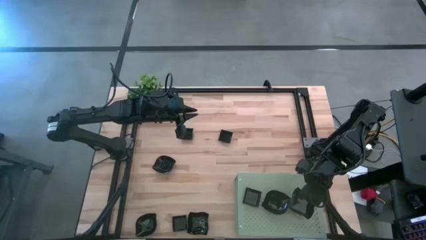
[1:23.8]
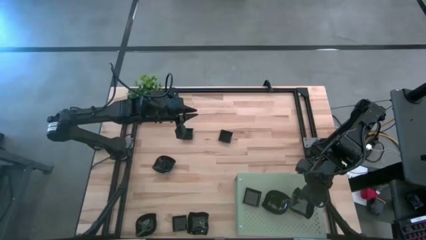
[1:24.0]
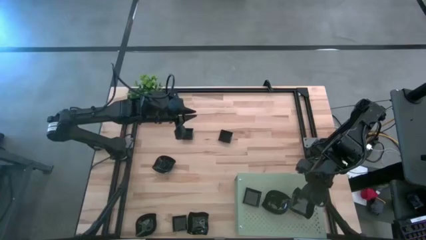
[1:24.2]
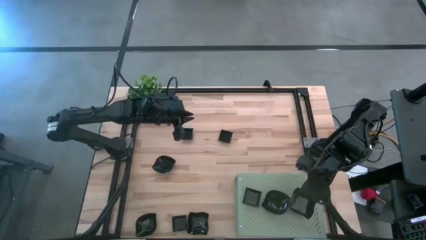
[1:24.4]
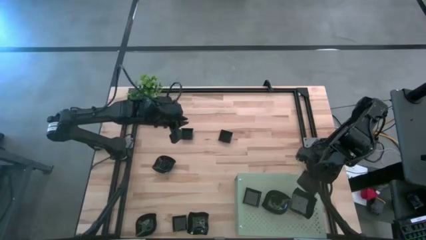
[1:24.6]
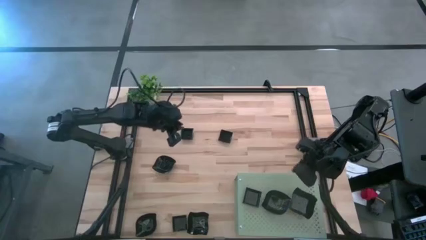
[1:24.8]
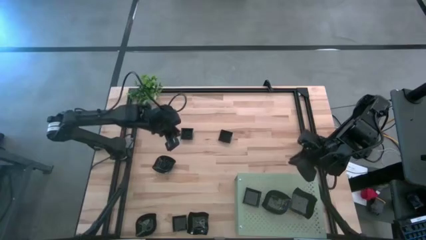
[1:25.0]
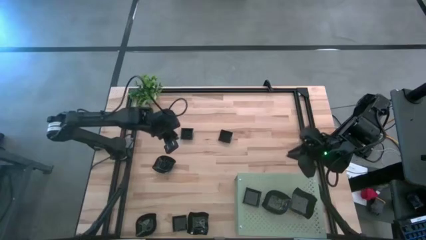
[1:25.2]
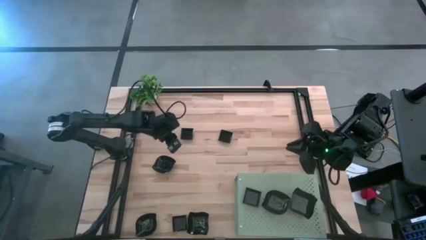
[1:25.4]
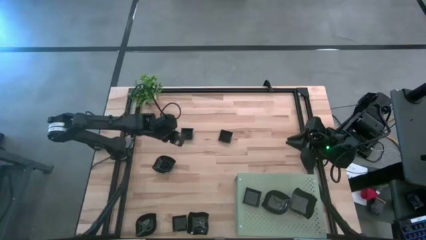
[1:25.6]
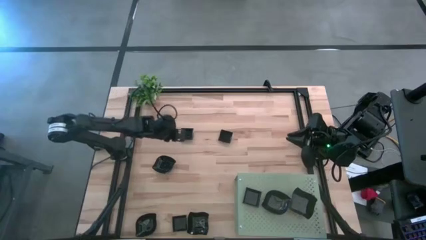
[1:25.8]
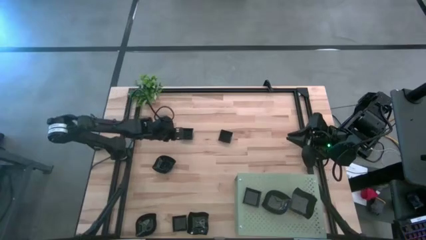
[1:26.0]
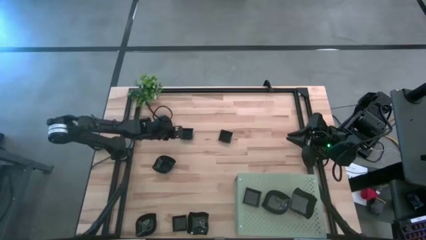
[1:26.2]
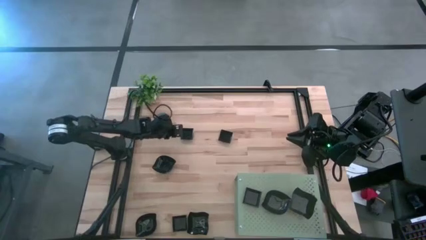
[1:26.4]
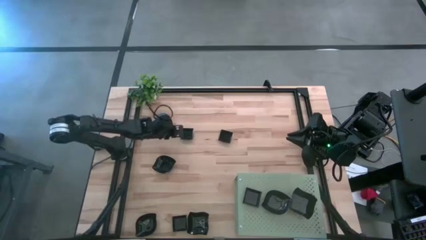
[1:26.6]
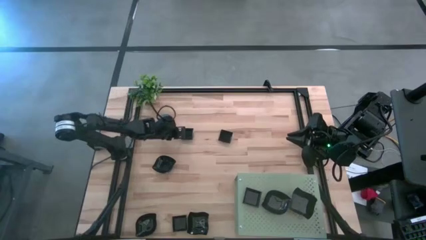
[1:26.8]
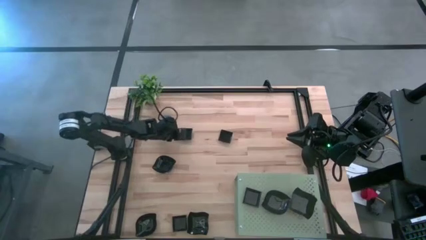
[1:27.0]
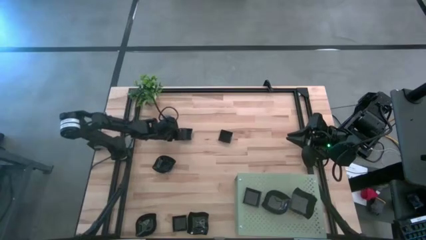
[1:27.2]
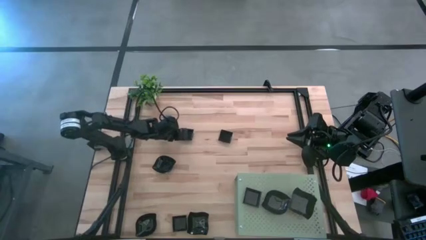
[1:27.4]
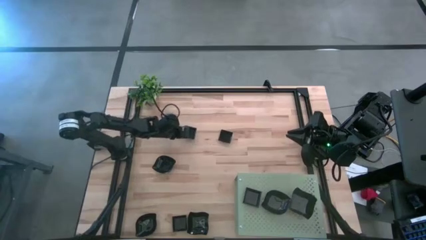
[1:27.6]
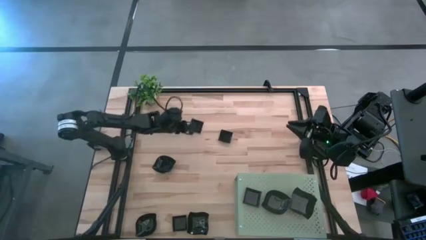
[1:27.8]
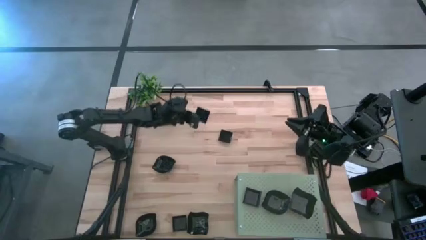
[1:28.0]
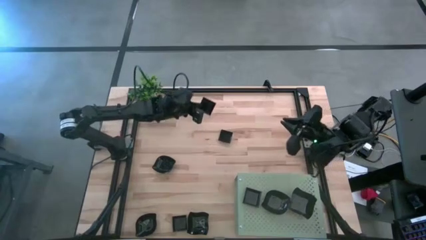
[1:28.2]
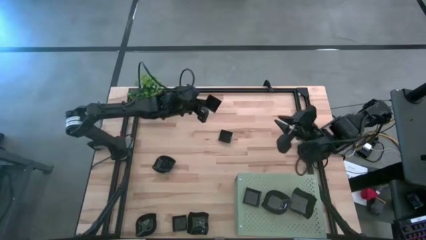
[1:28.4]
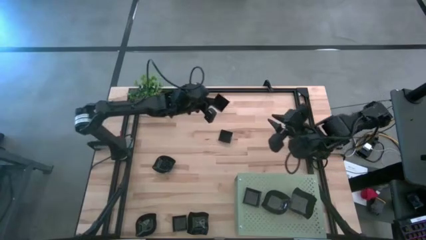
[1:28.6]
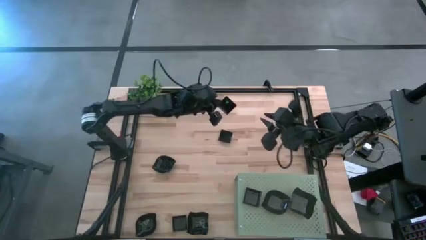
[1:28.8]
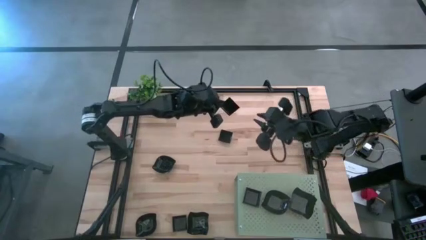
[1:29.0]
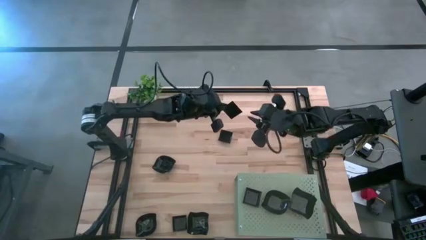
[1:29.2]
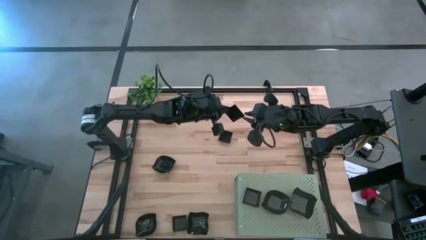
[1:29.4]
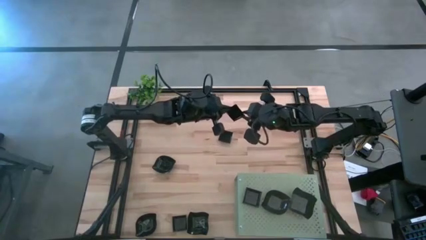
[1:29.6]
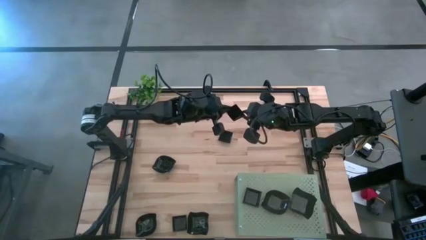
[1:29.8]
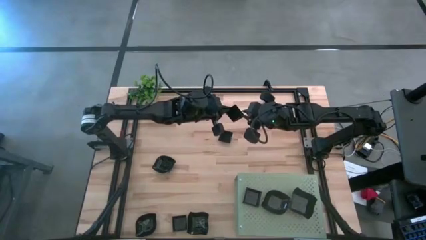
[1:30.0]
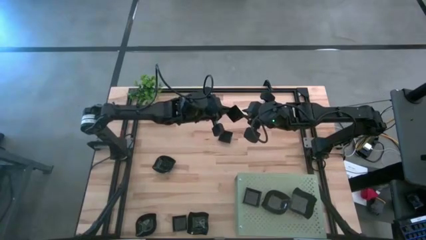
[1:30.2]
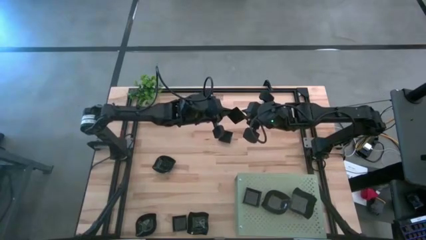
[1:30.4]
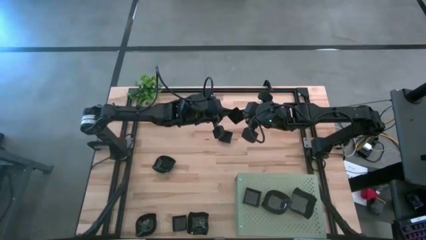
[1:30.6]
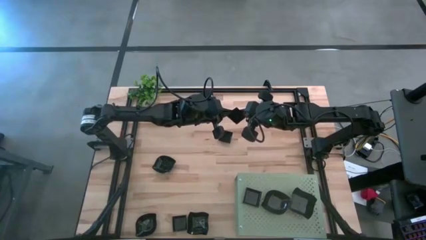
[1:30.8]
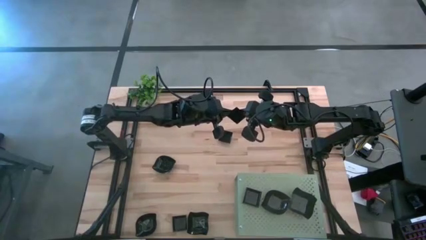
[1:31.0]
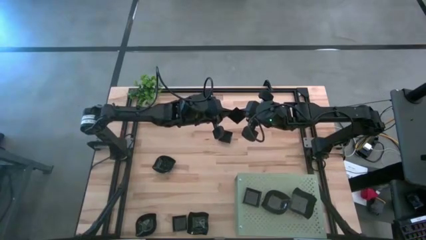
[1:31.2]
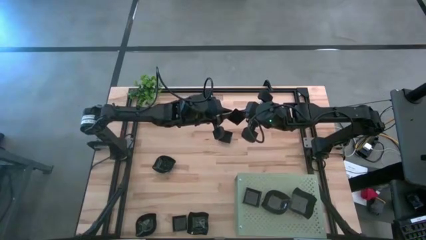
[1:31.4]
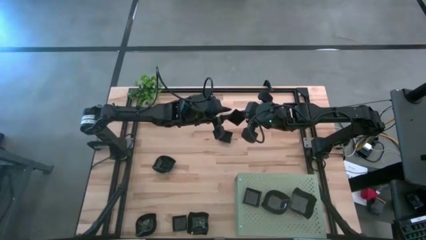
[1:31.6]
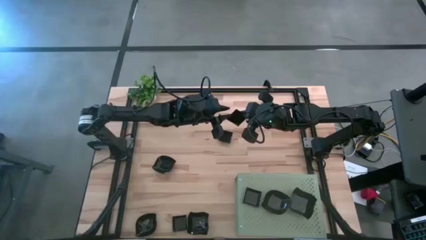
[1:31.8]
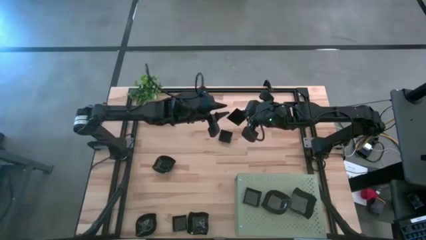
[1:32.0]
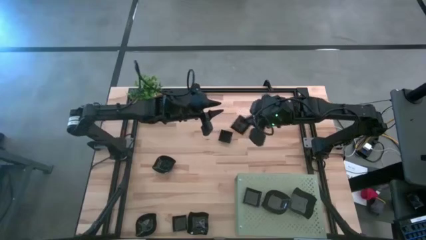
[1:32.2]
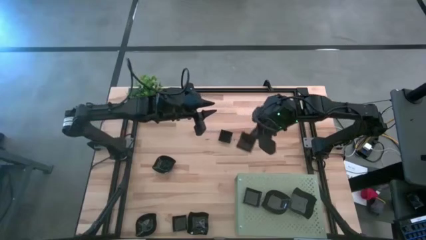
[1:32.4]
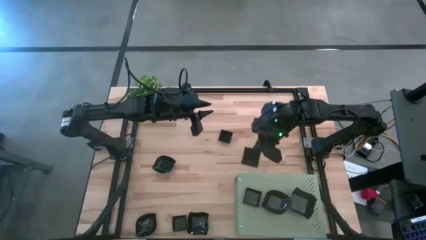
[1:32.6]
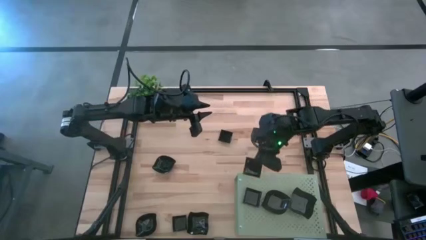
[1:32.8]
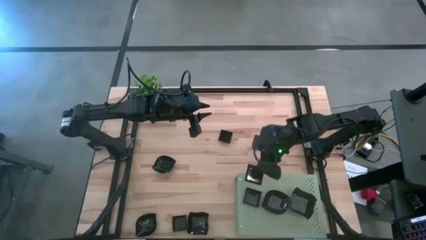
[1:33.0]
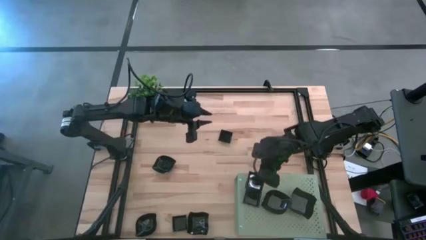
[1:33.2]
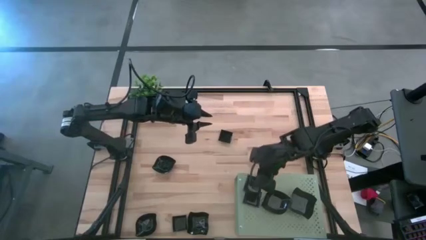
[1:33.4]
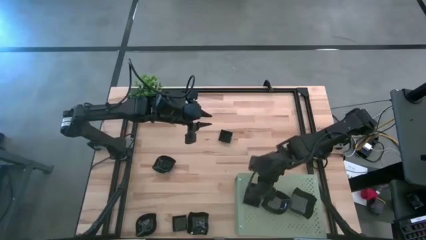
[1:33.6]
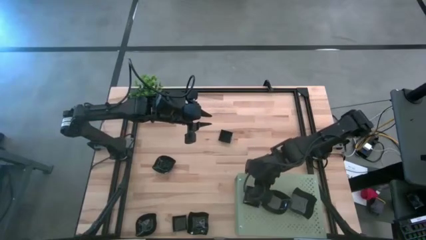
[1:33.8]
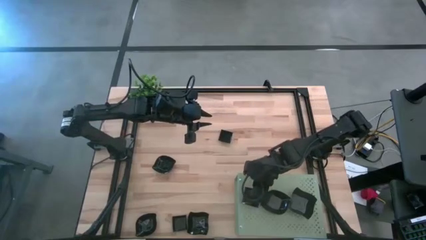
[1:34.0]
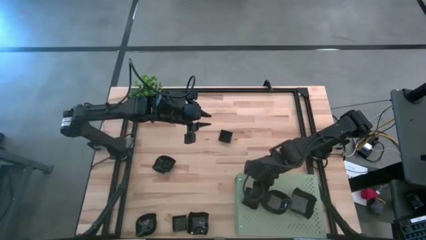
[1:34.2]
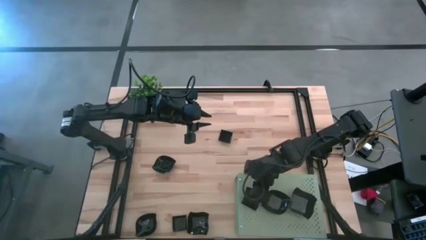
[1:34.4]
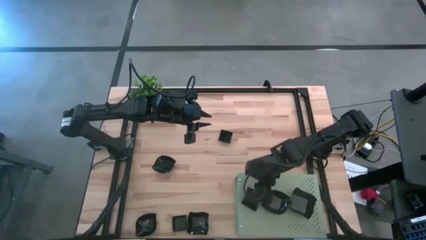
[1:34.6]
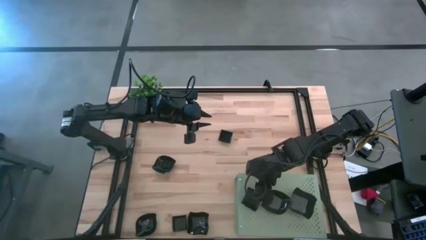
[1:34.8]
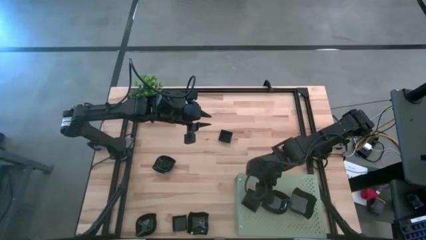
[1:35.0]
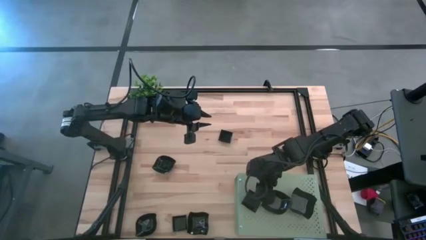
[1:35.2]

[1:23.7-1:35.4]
Task: Pick & Place Mini shaped plates
Stack the square plate in the square plate on the shelf

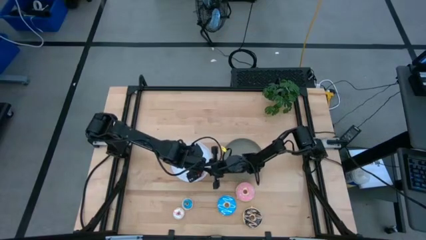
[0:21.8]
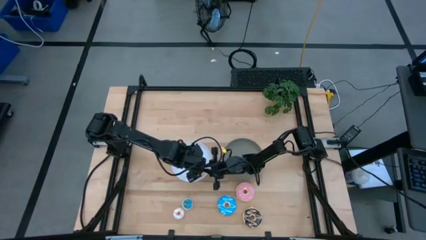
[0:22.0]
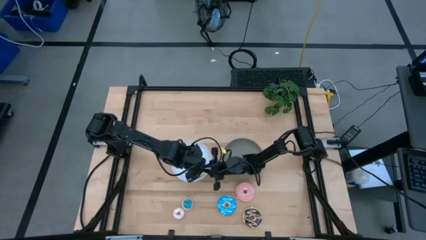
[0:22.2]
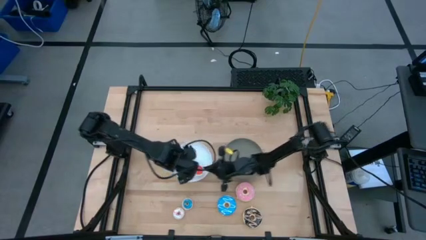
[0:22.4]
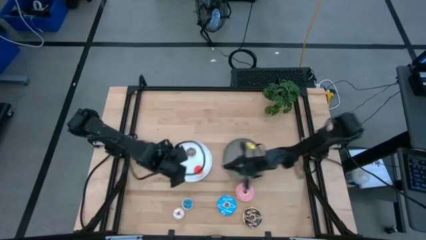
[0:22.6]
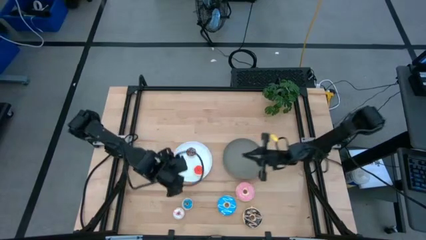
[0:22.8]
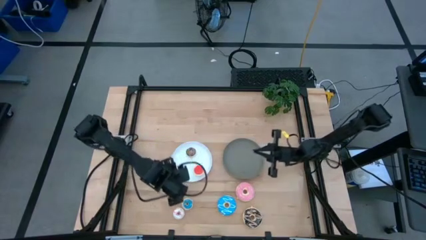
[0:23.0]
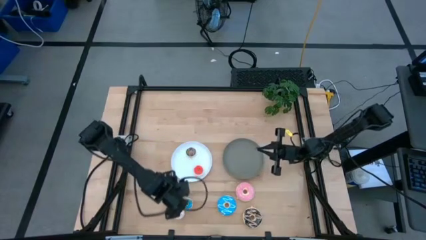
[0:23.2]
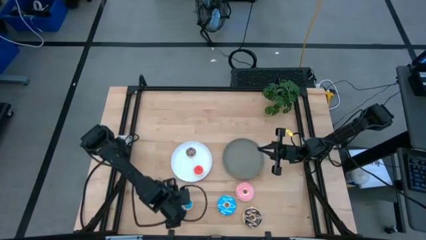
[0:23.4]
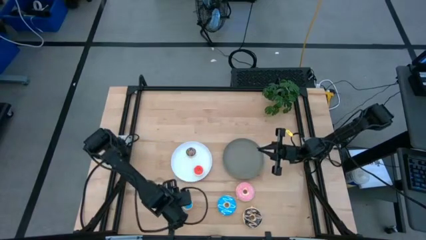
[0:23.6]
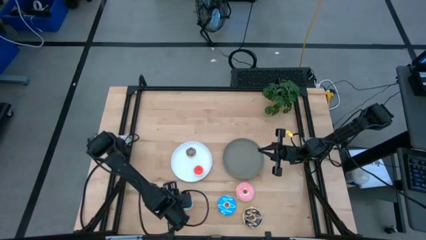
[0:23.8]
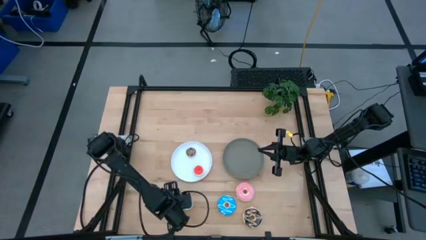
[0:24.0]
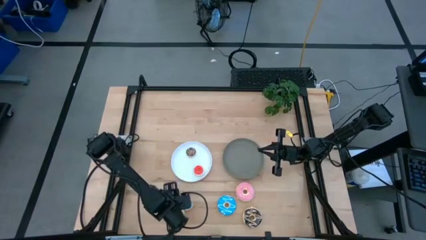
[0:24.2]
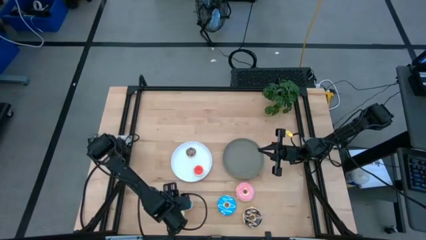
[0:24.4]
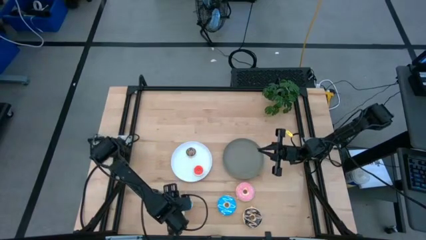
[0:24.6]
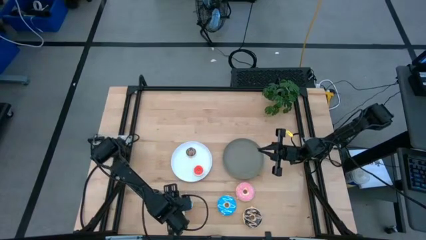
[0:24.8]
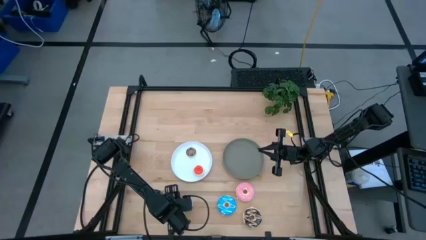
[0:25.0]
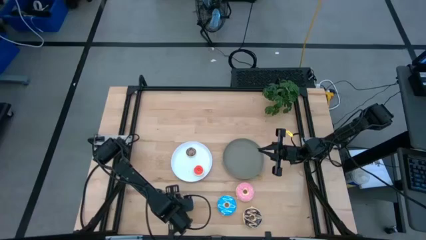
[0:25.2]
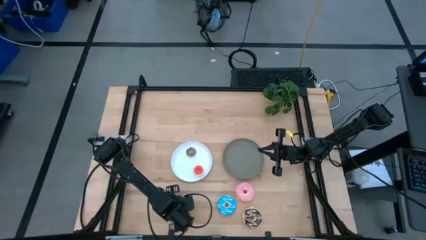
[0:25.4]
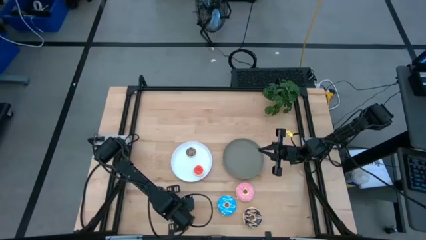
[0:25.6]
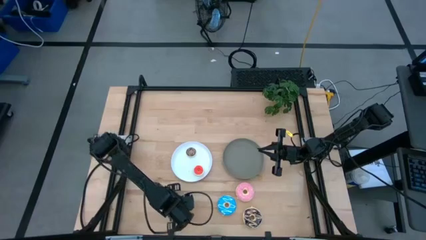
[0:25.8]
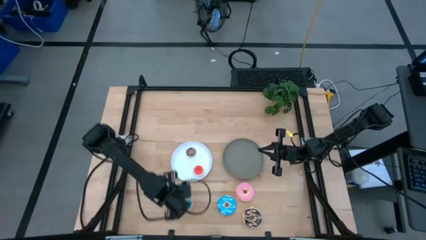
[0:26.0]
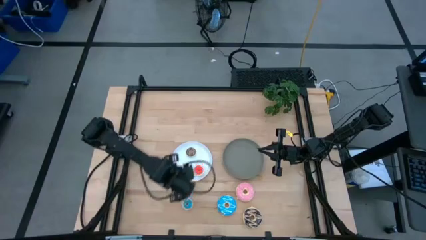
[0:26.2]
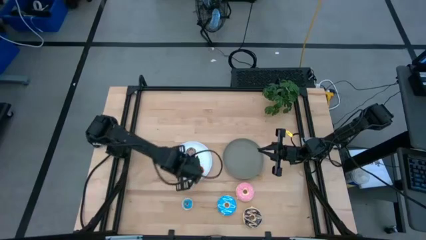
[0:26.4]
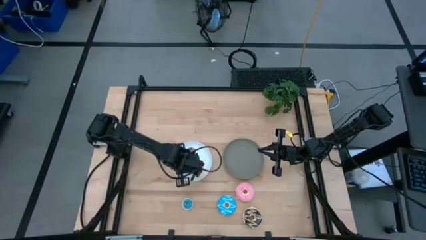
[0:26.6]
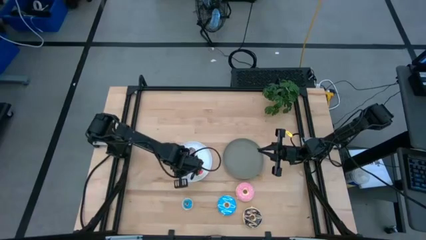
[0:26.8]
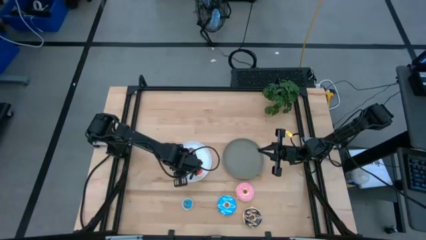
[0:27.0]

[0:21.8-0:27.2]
Task: Pick & Place donuts
Put the small white donut on the white plate
